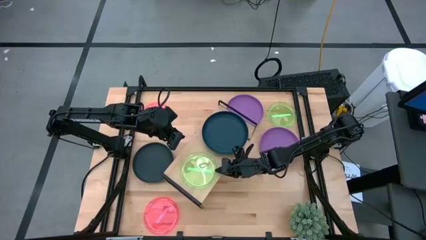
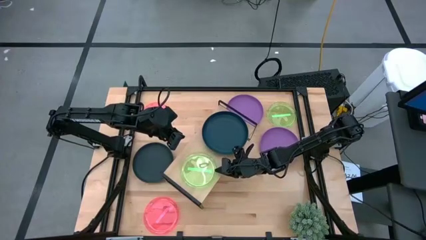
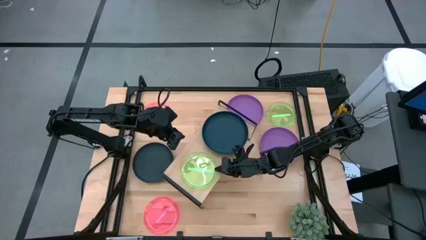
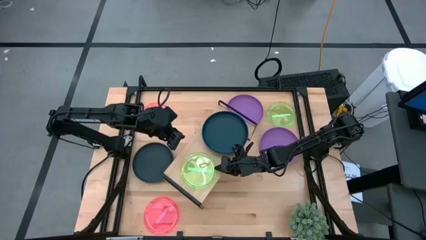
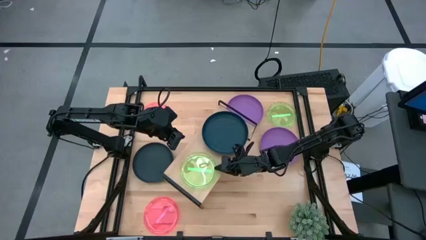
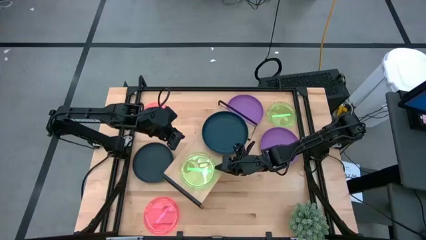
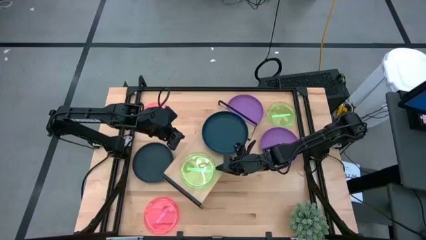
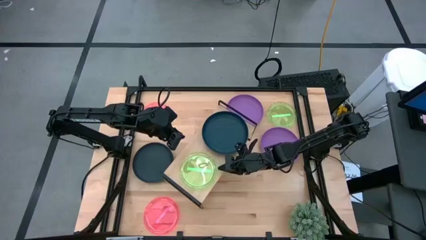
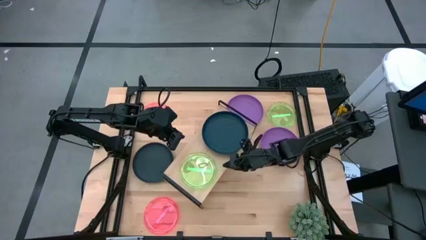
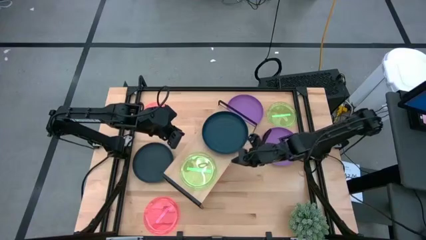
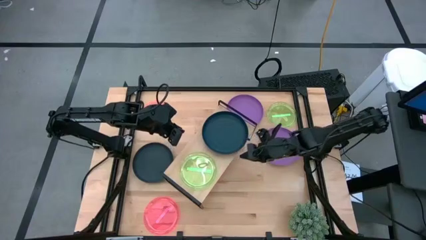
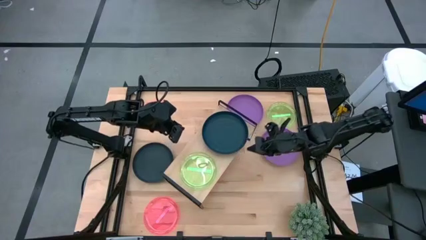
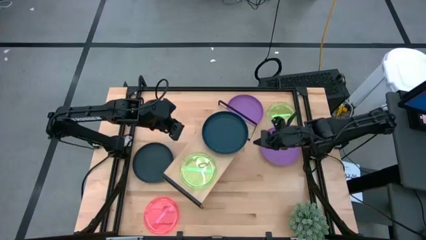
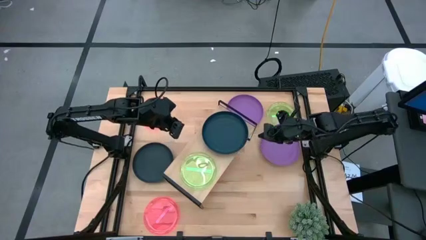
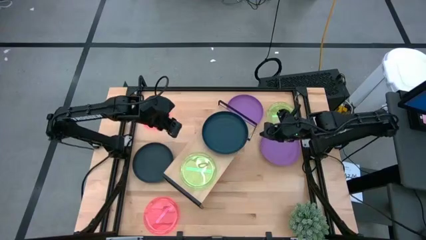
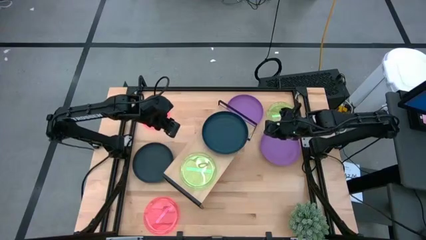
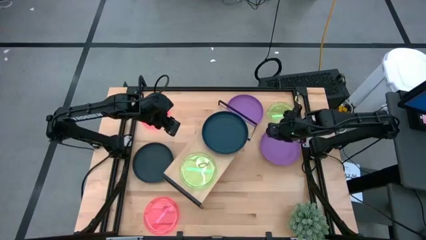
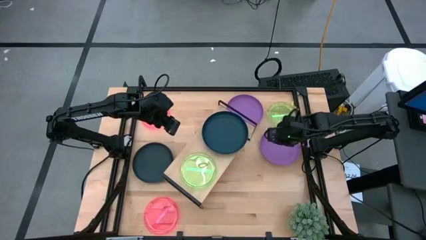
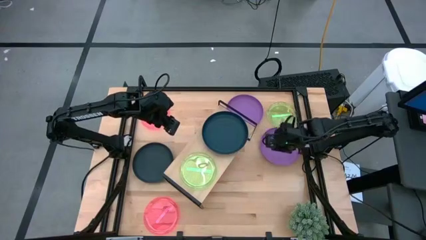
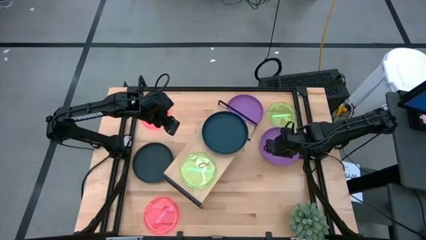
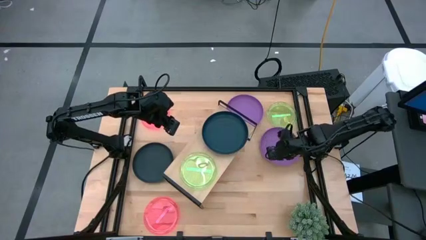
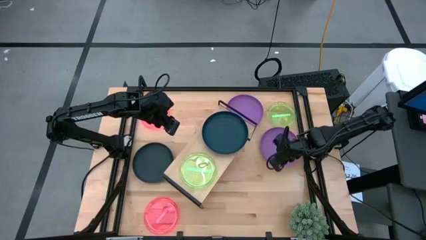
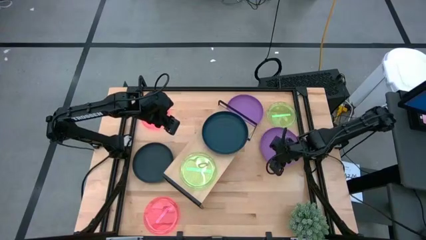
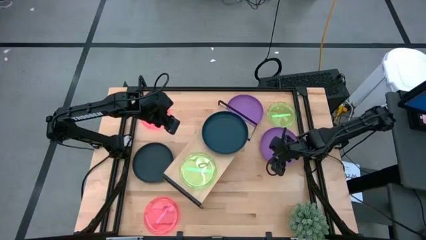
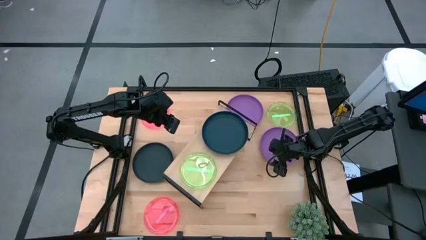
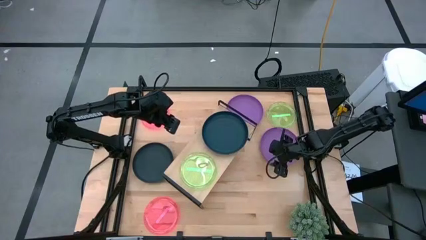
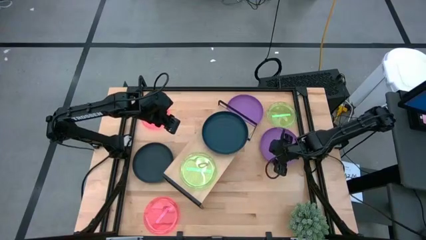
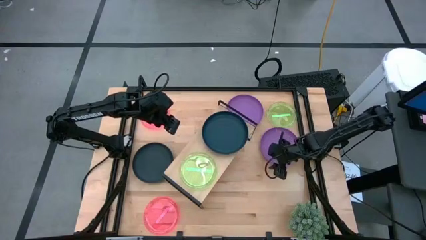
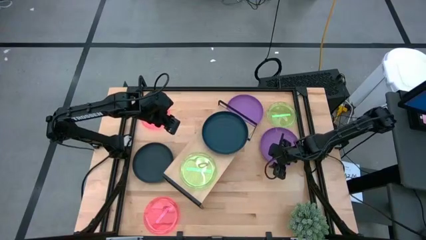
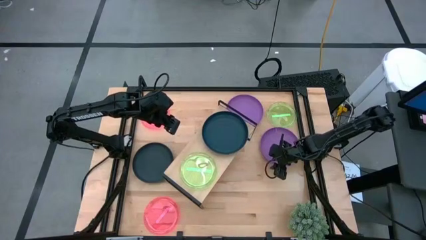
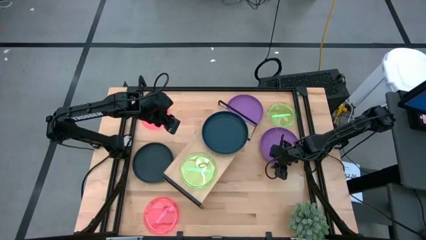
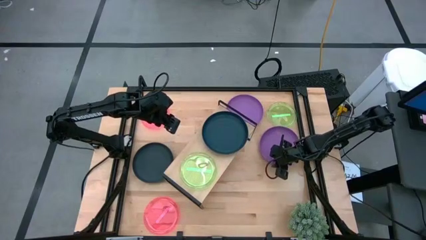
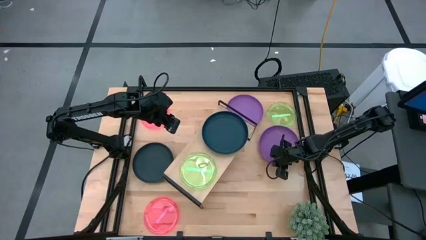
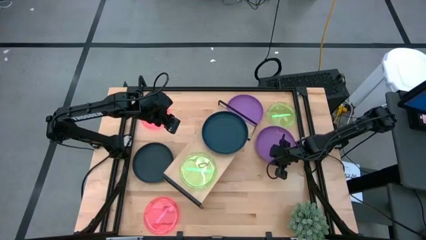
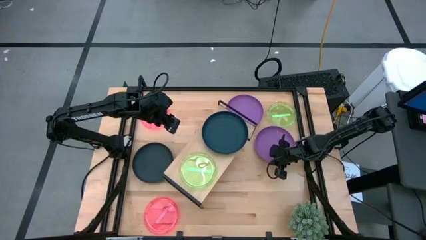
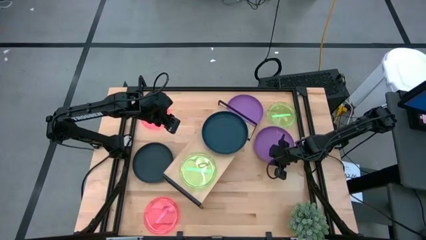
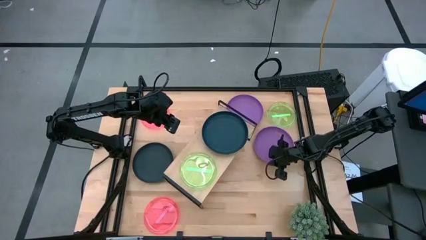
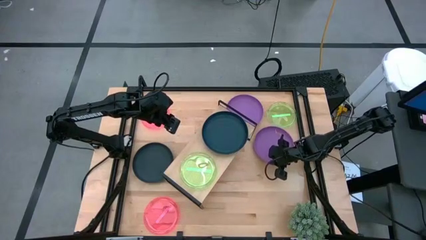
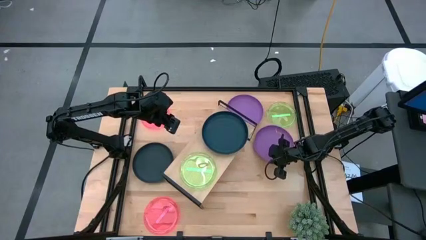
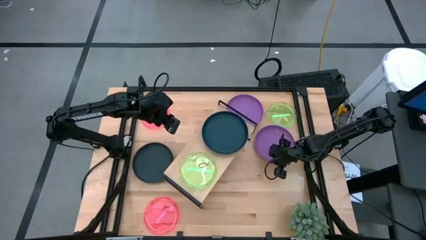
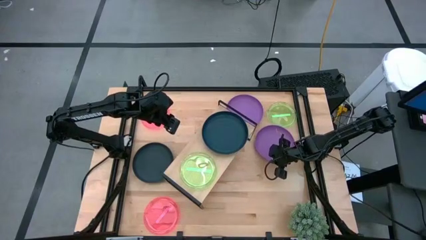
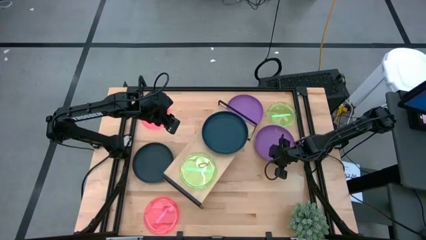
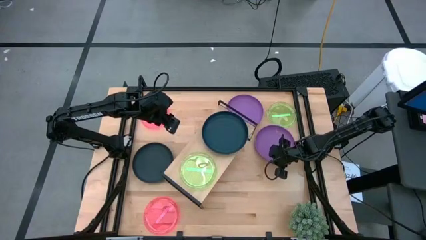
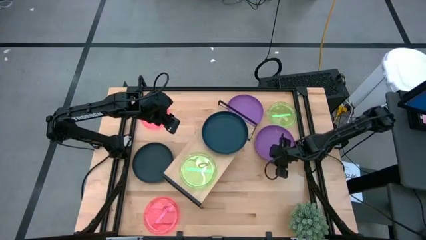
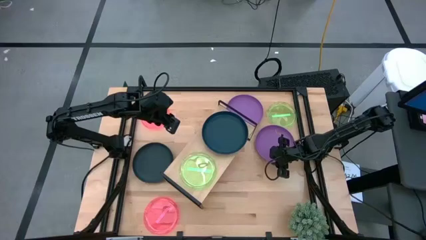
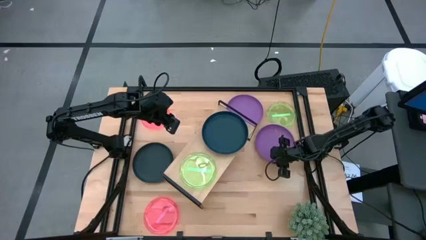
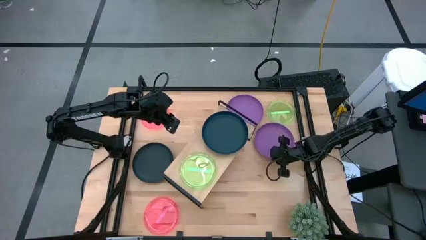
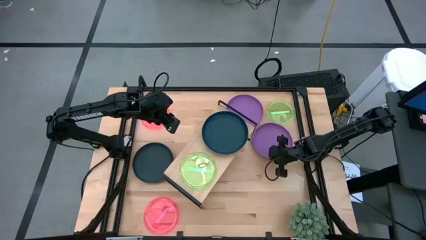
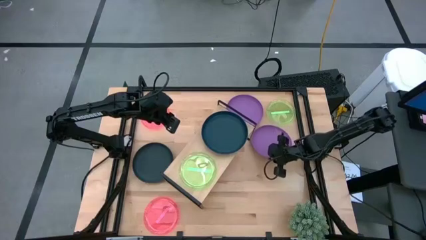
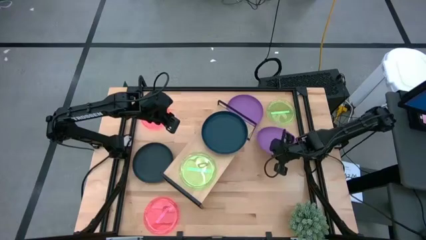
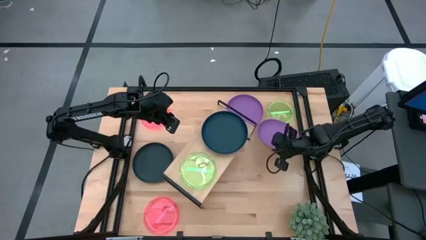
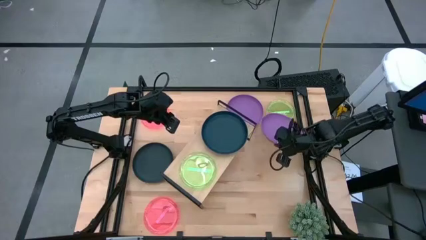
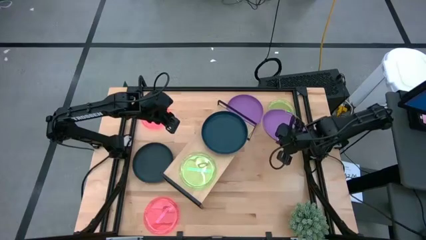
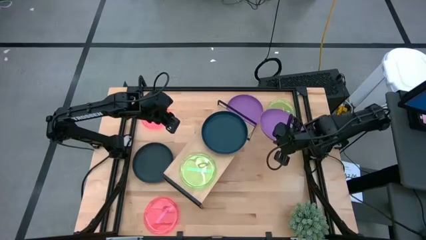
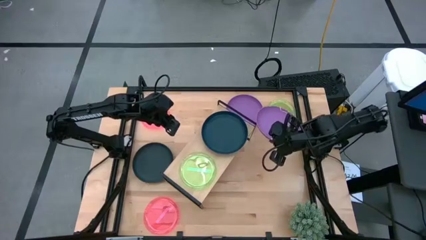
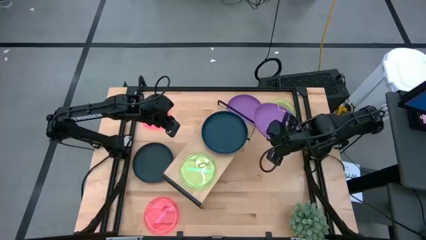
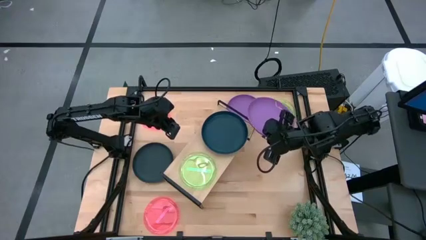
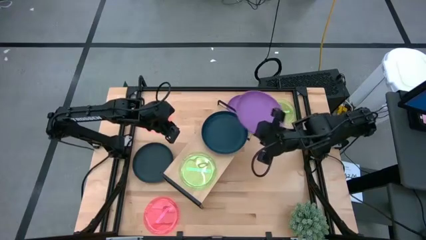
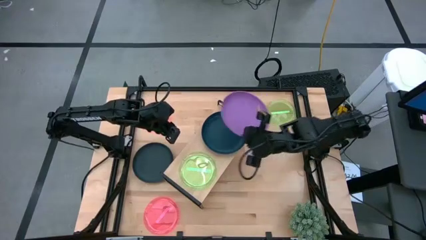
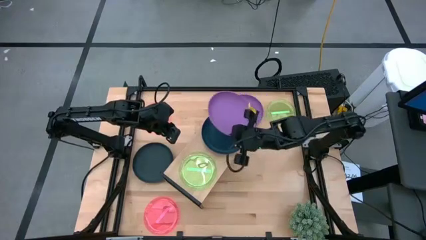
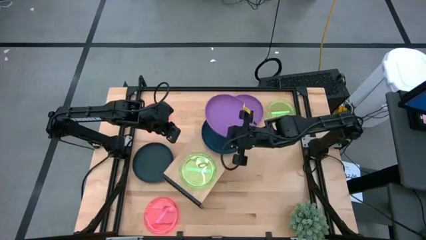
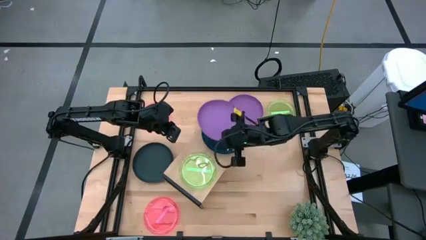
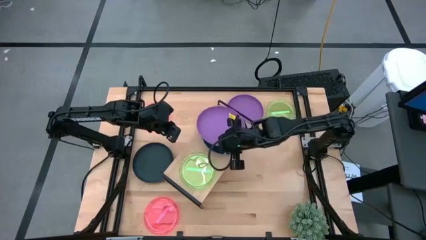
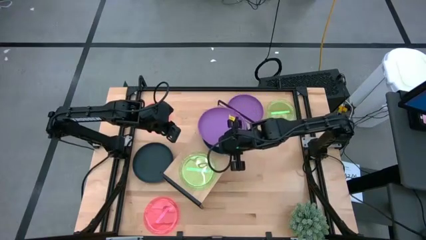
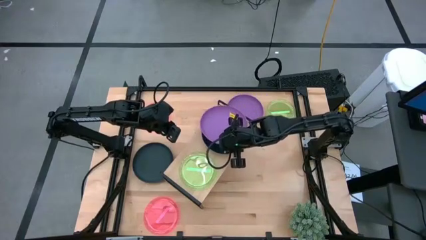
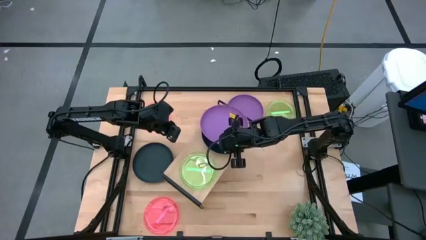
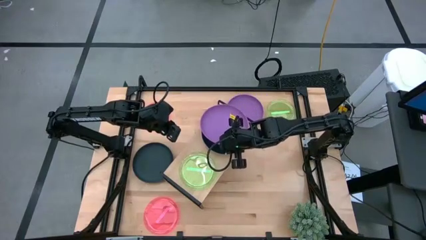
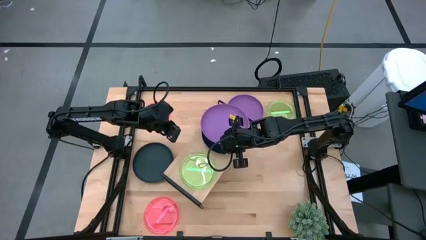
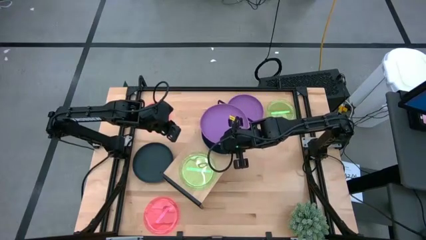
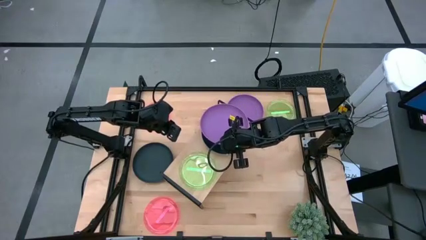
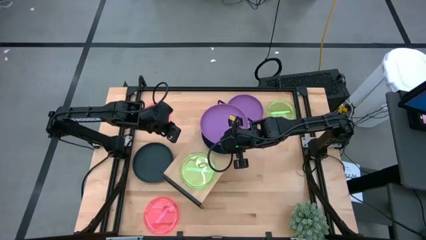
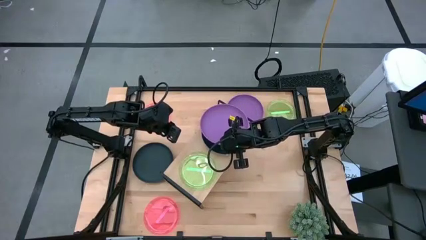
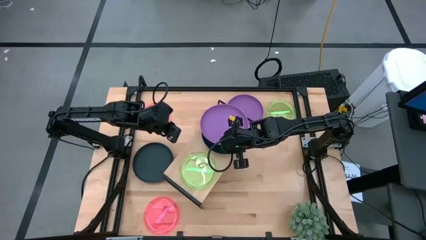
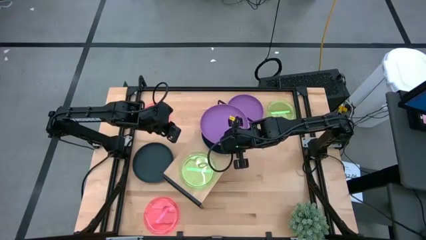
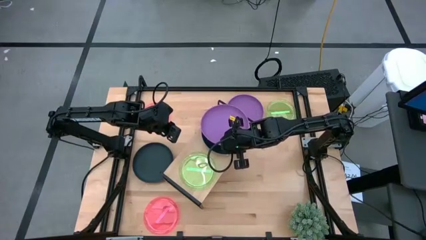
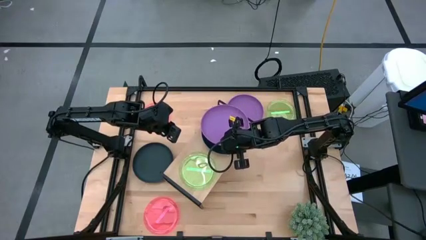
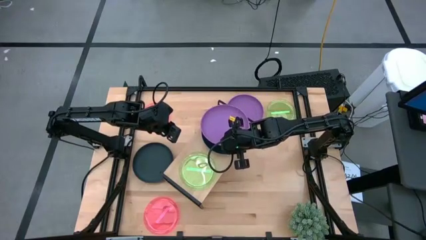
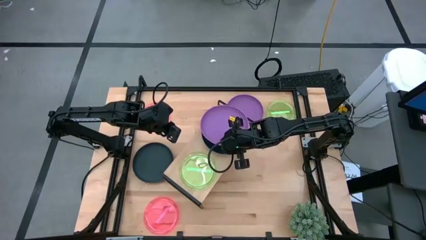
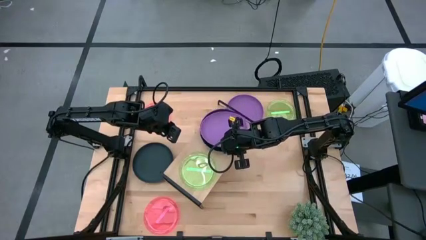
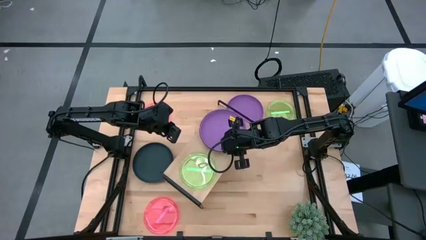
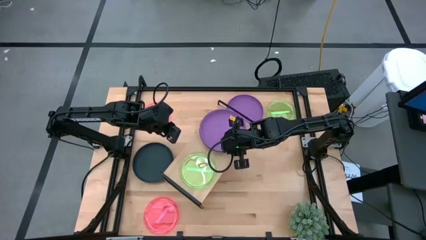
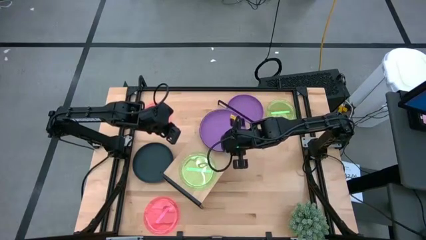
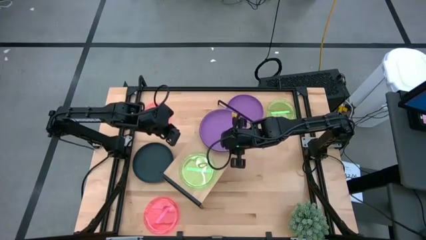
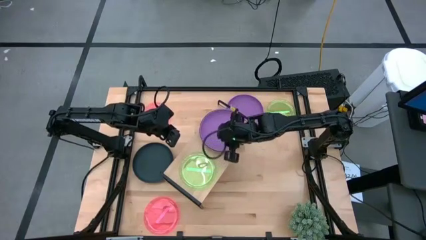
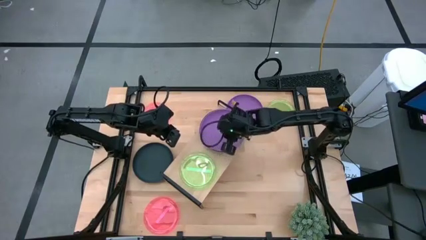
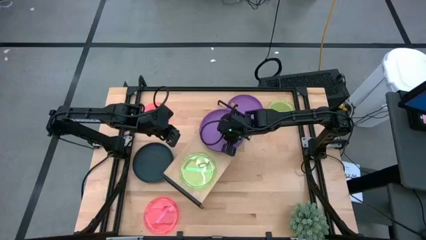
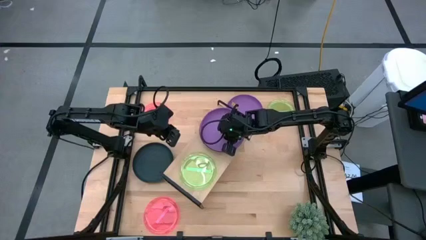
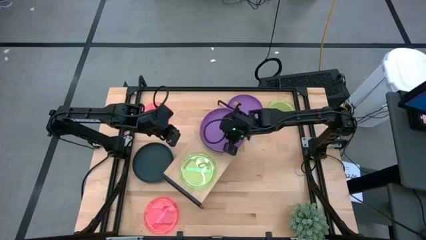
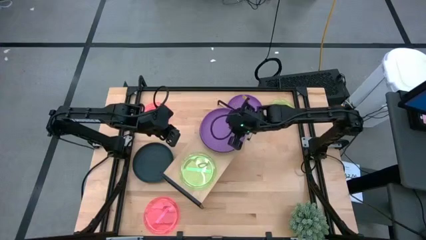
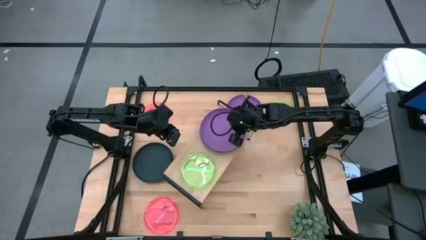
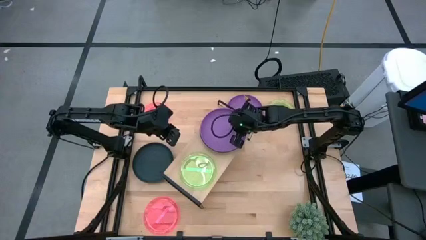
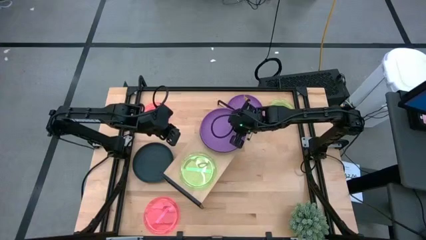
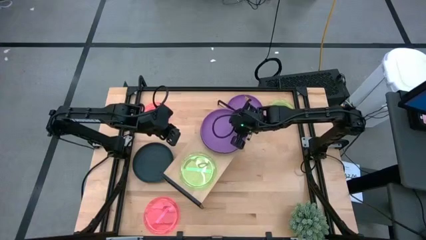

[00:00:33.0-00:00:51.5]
Task: Place and stack plates onto a shelf
Stack the bottom purple plate on top of the black plate on the shelf
